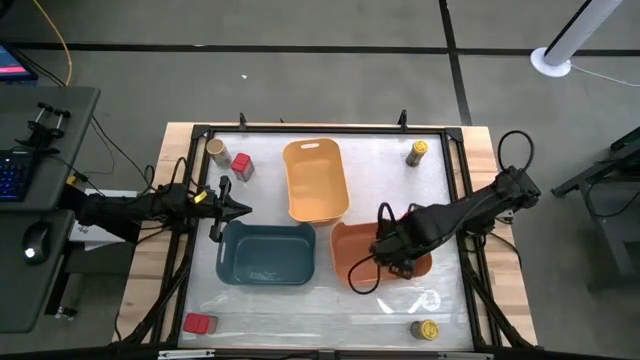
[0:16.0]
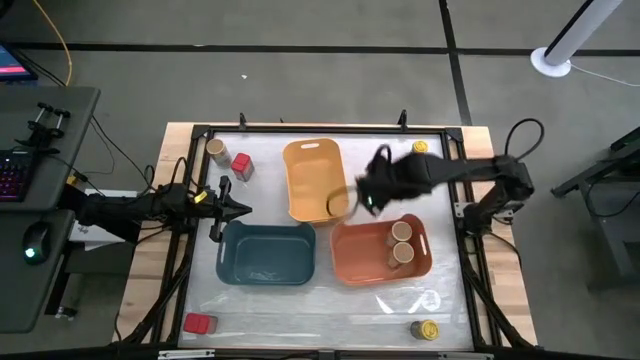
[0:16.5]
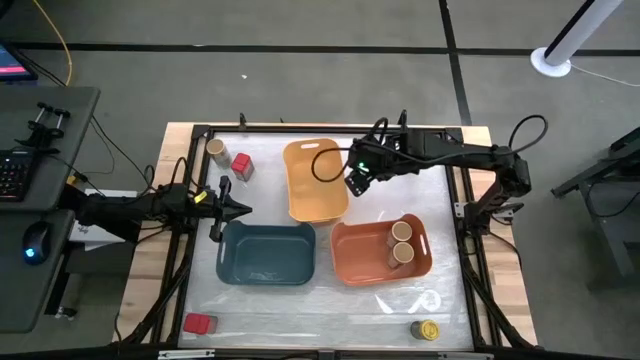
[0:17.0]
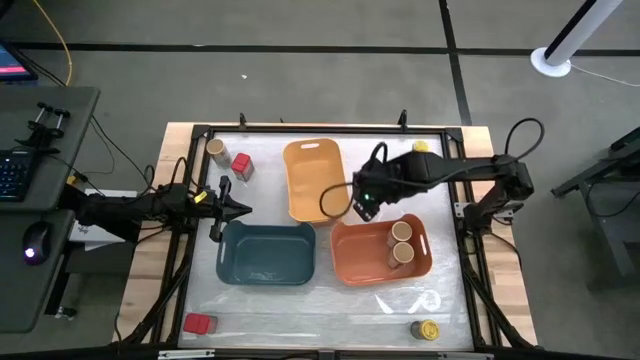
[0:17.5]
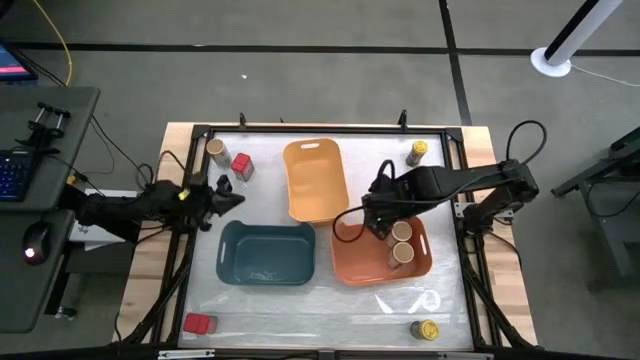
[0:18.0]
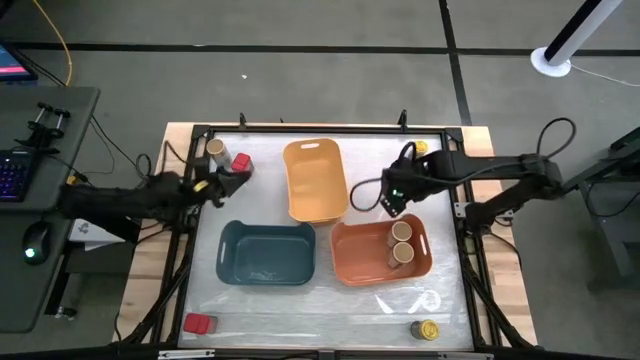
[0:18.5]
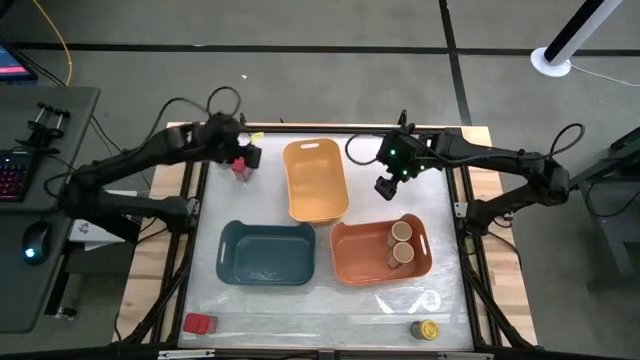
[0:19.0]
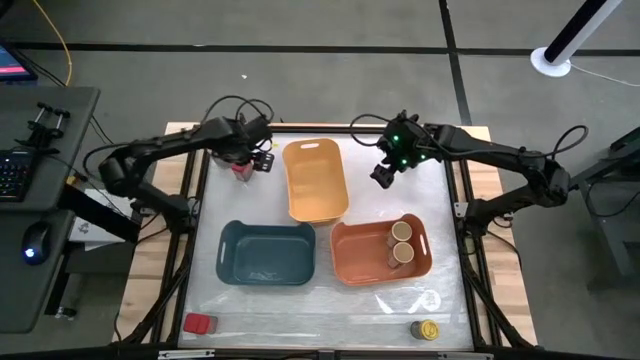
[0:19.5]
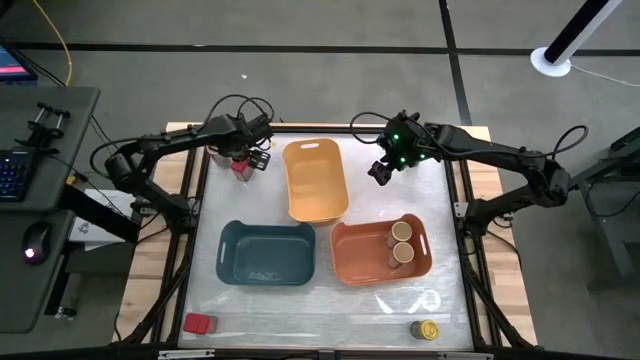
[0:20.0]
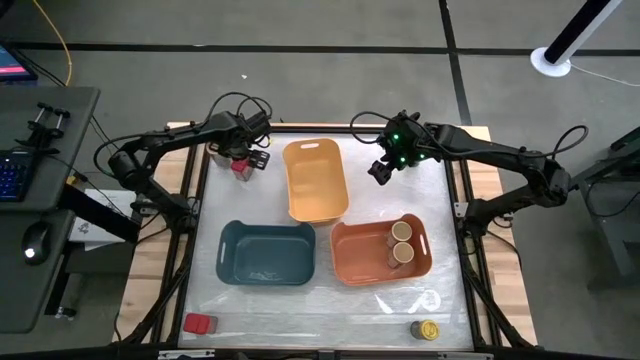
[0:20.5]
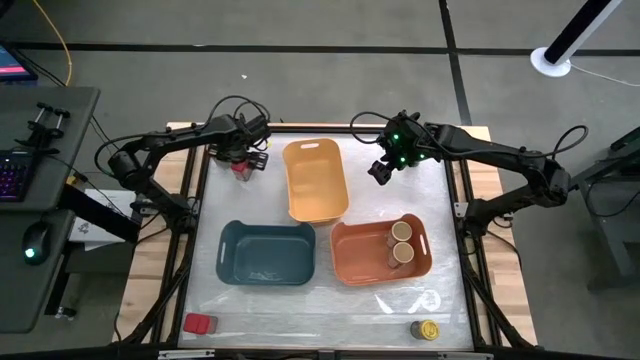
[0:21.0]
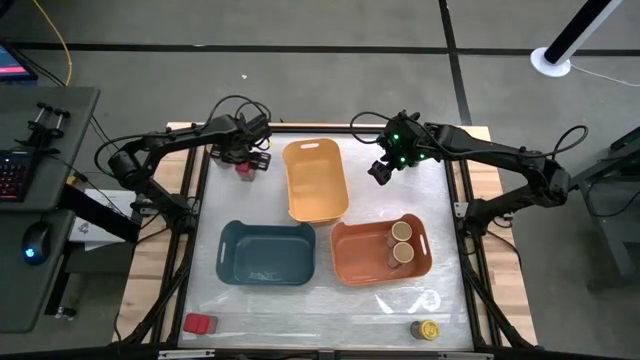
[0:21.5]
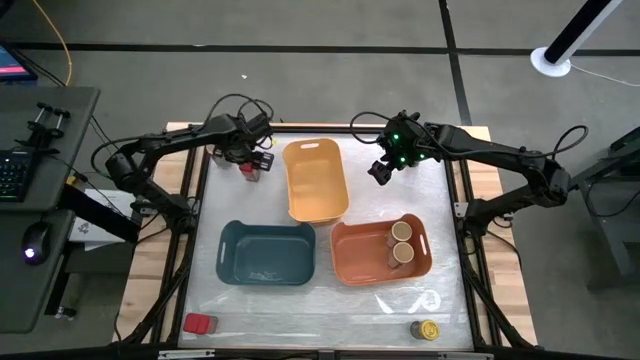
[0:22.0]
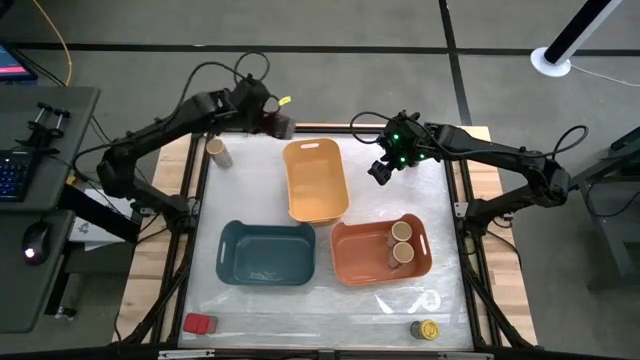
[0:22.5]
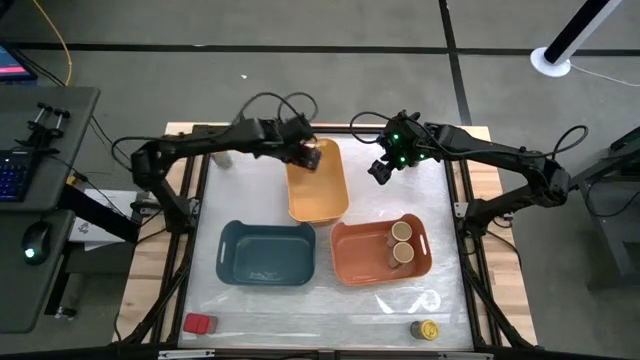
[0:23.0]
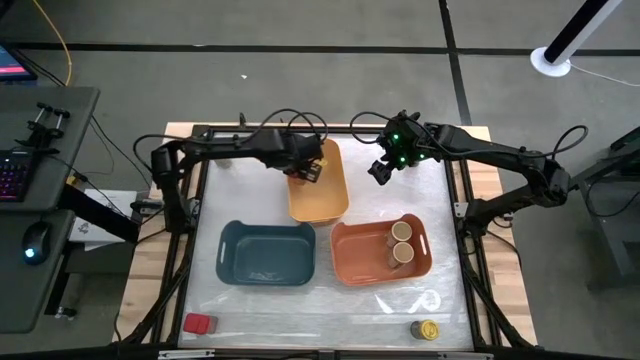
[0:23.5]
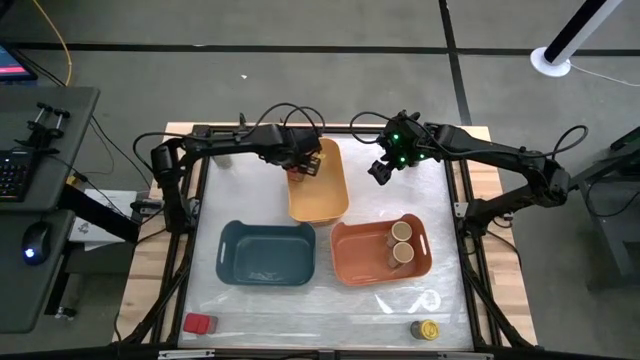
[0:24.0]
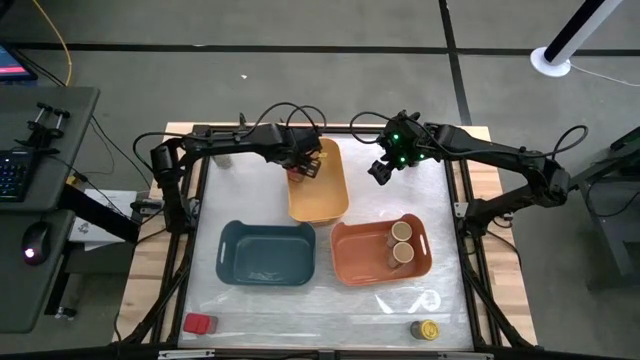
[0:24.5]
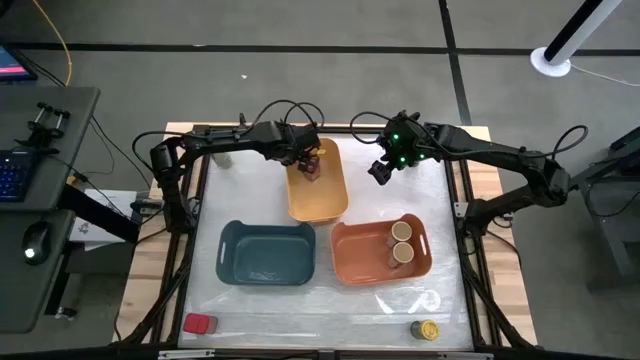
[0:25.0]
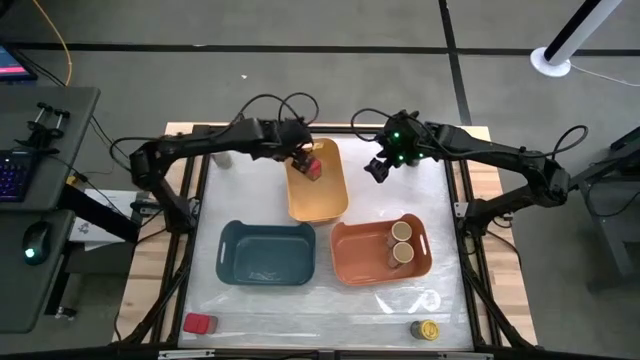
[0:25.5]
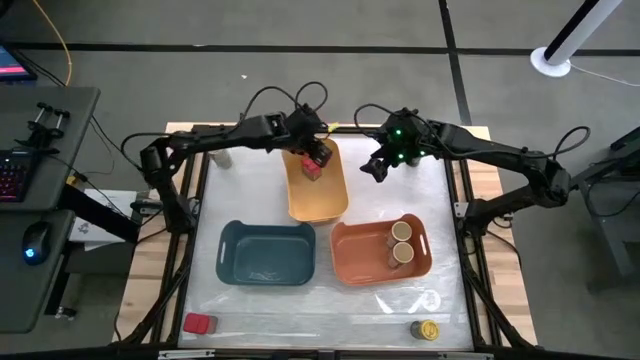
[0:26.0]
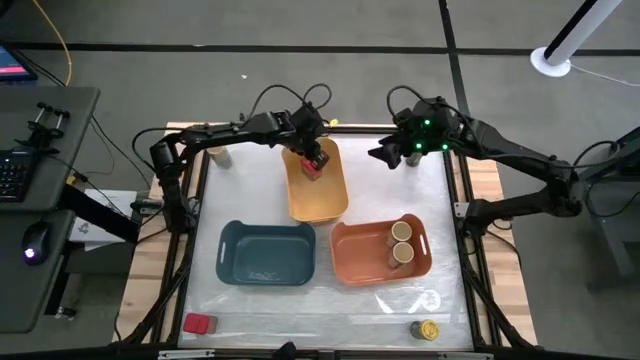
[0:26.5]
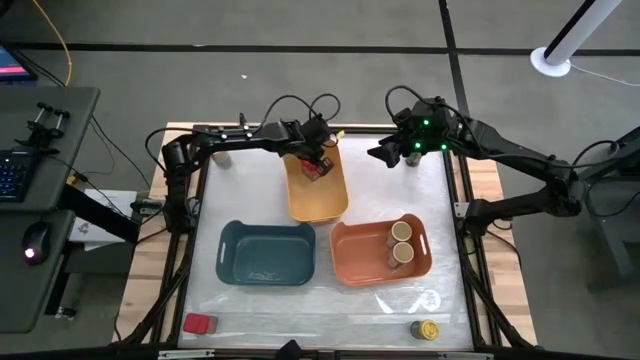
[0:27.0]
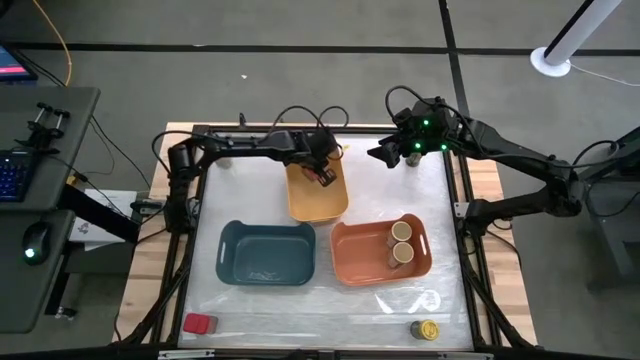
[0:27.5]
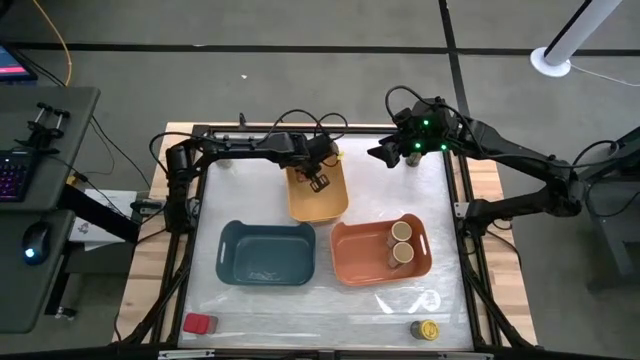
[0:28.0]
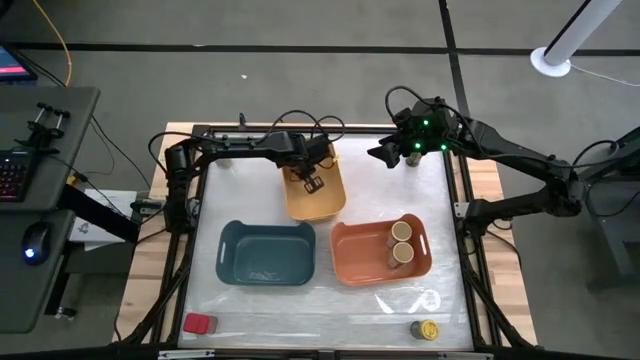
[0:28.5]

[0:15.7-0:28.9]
Task: Sort spices by type
Put the top red seasoning can into the yellow bin

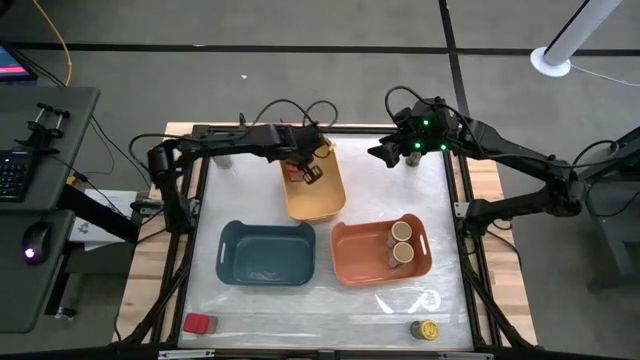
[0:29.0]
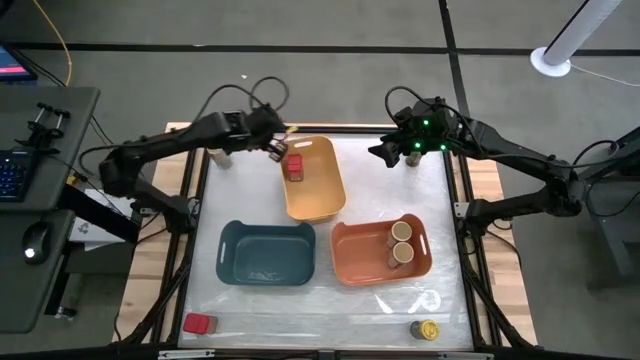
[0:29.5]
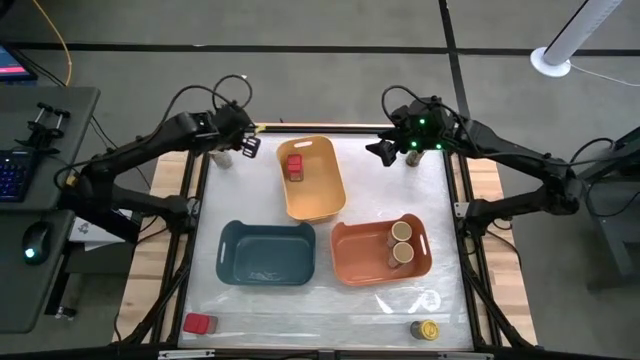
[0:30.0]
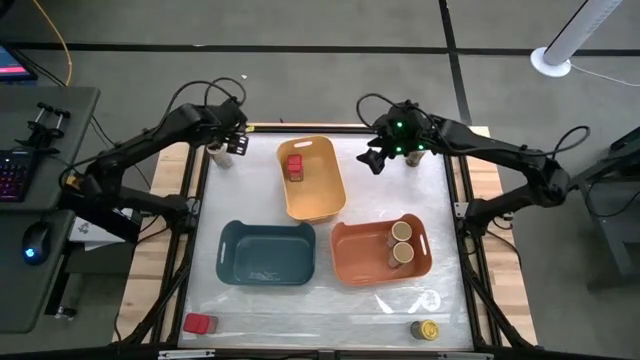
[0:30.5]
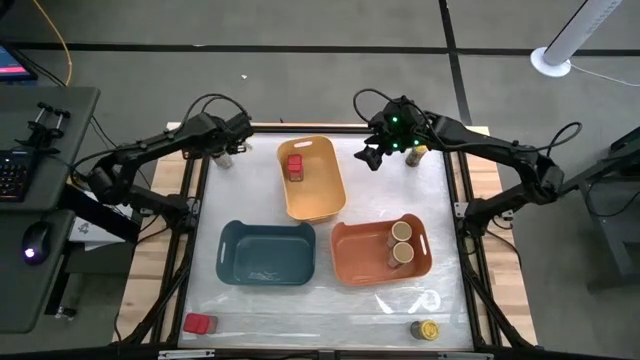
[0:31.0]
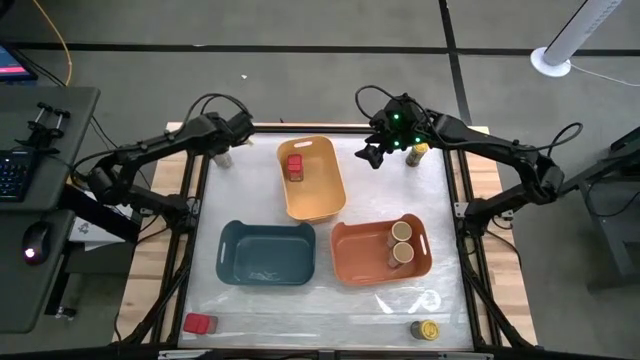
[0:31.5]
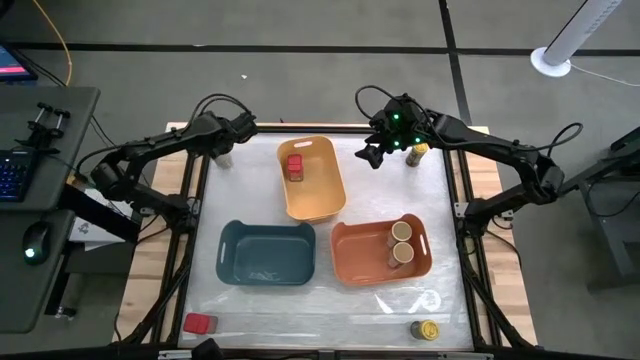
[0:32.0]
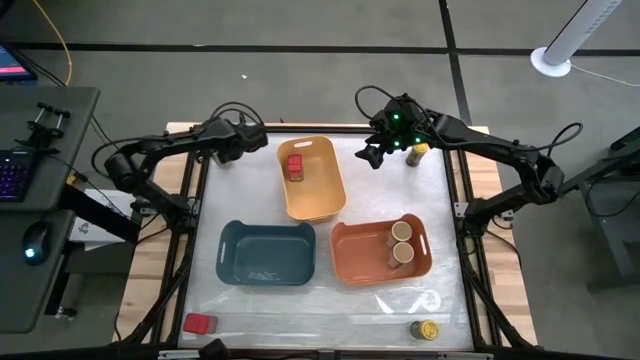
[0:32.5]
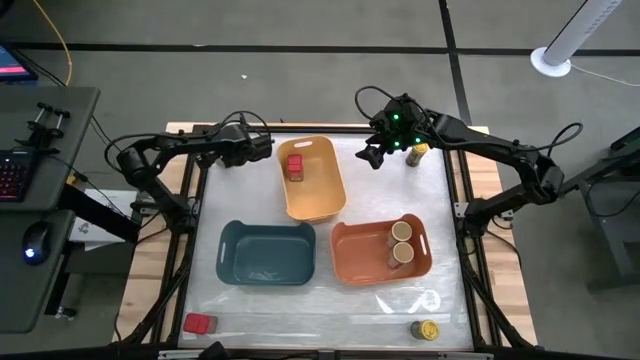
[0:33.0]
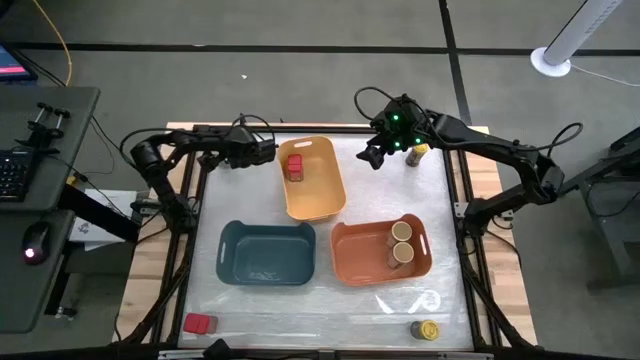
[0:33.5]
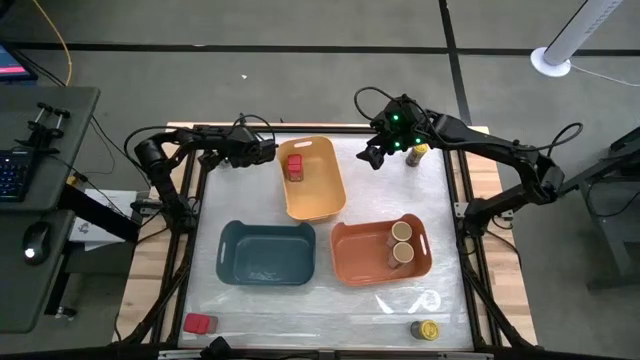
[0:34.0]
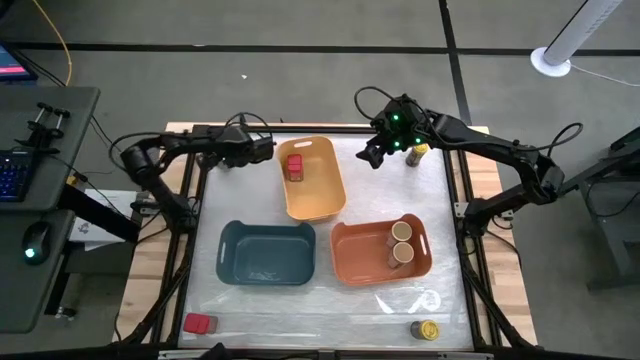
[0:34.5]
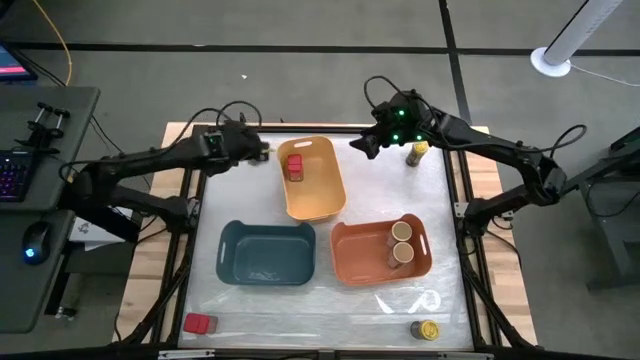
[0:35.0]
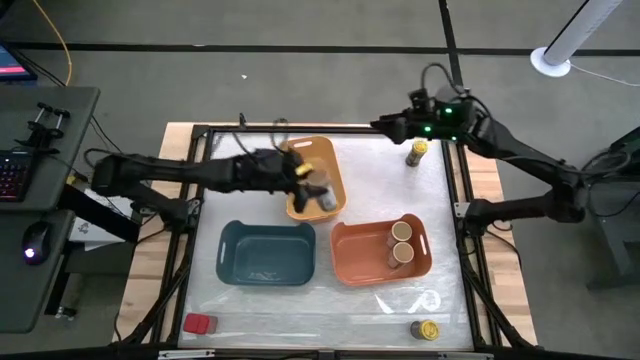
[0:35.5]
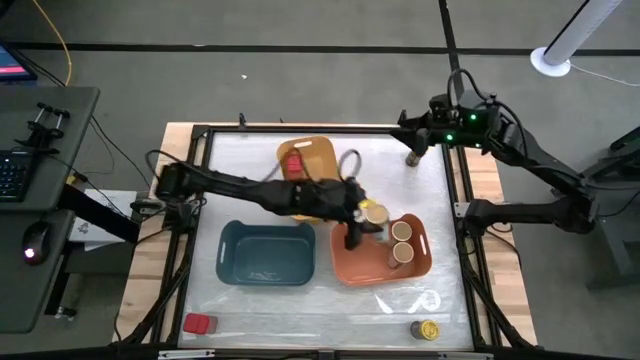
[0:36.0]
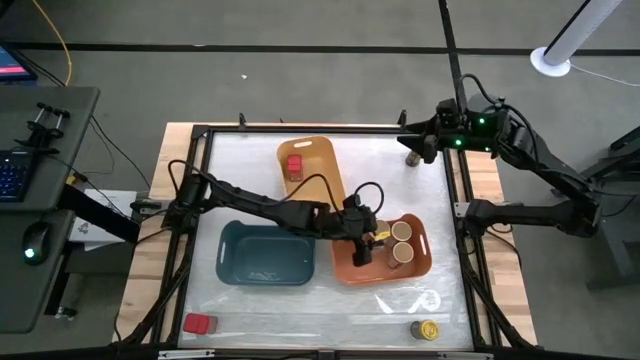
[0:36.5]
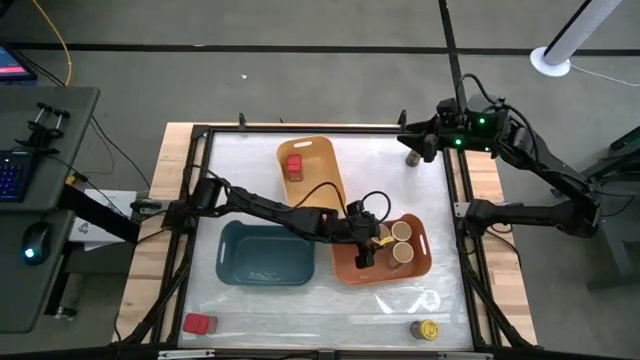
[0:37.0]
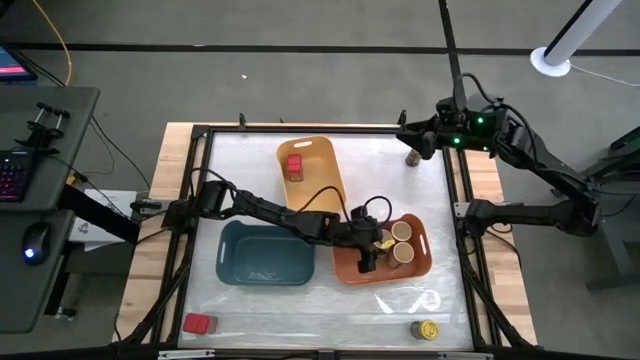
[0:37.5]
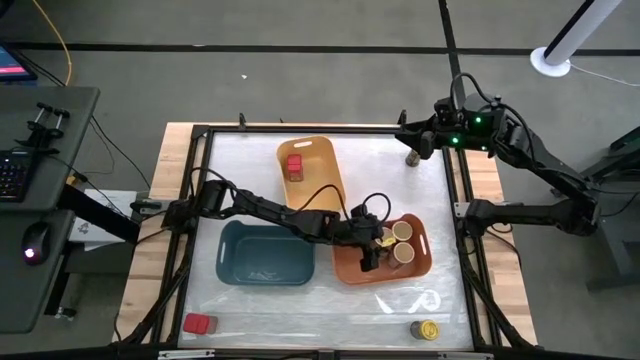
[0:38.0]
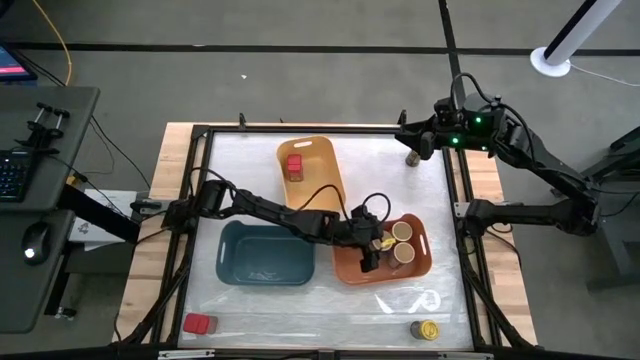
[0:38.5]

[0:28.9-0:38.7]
Put the brown seasoning bottle into the orange bin
